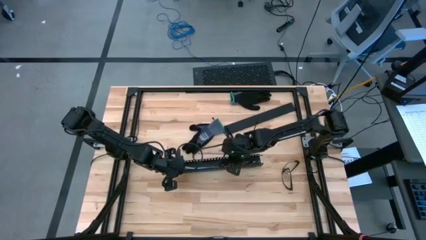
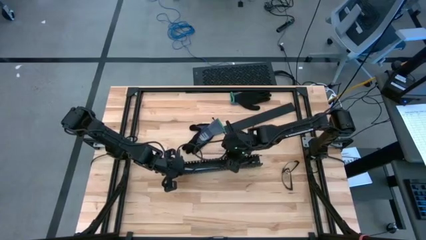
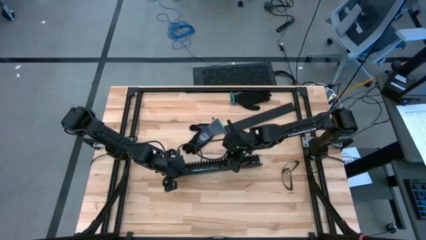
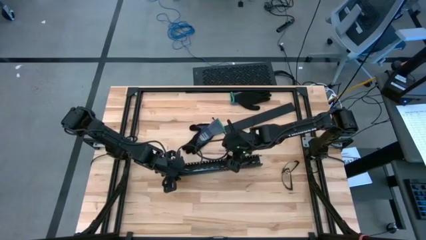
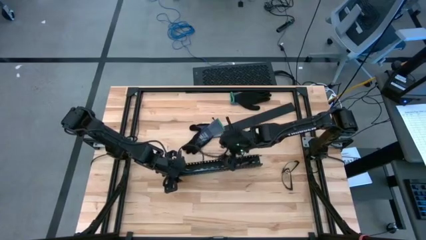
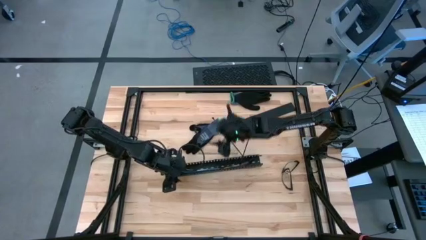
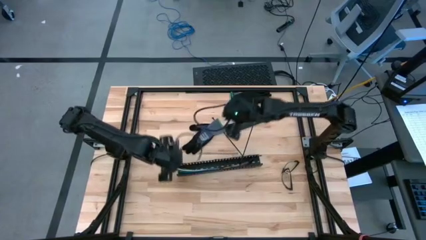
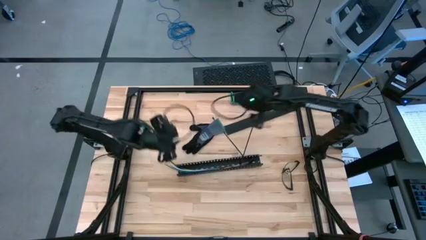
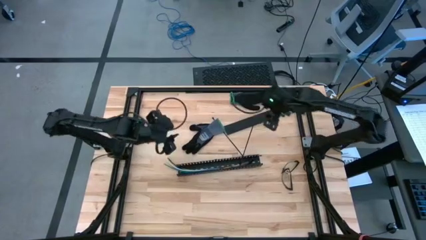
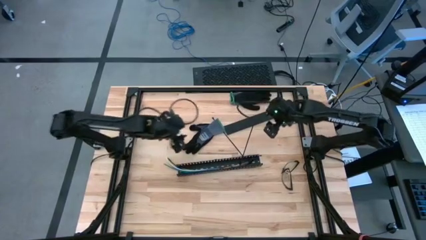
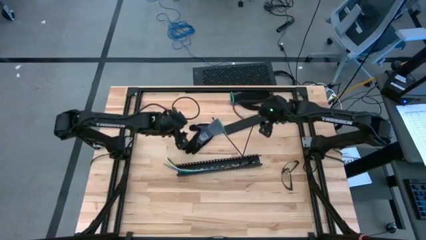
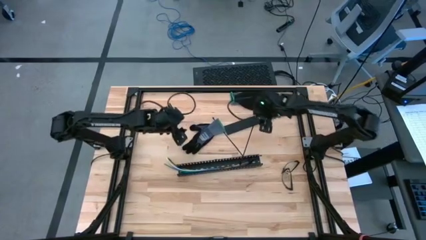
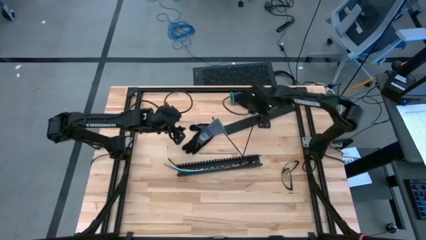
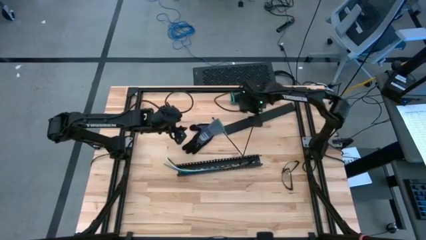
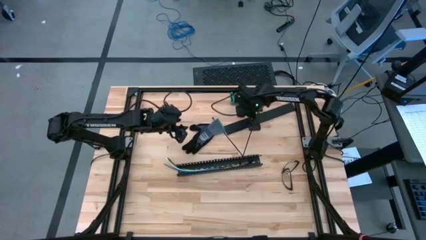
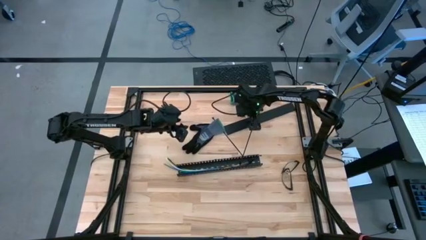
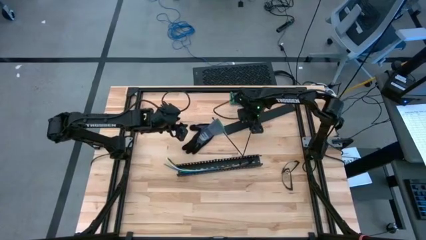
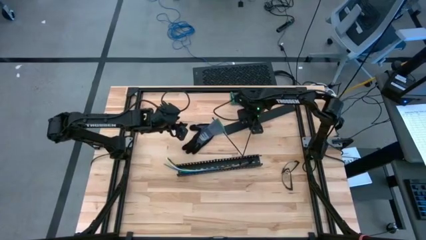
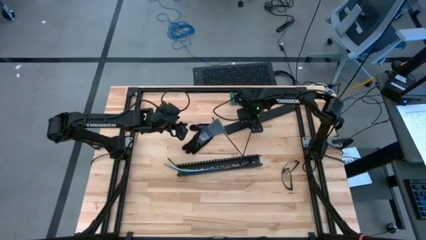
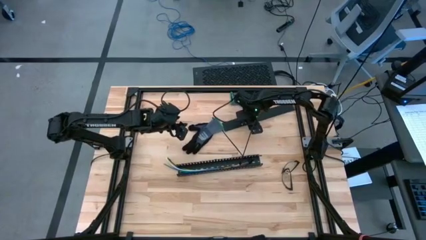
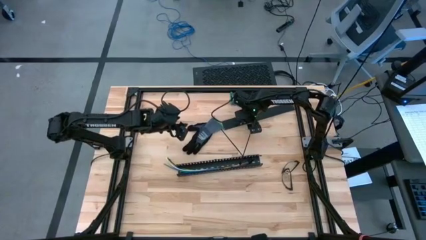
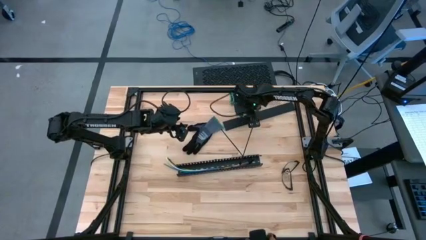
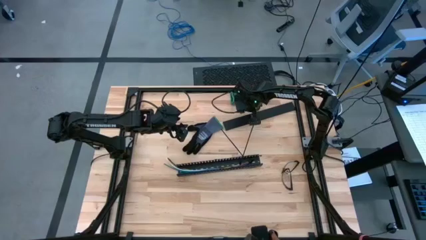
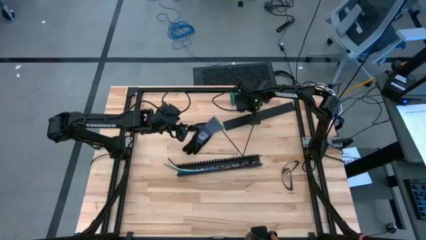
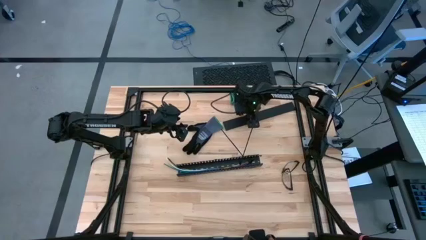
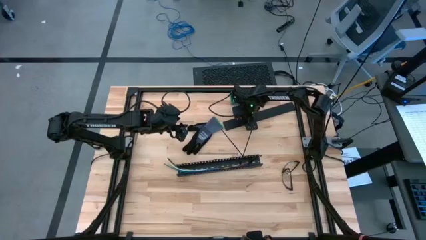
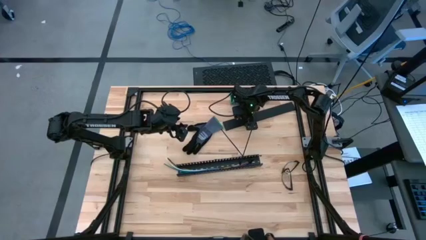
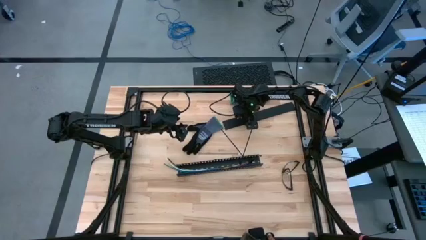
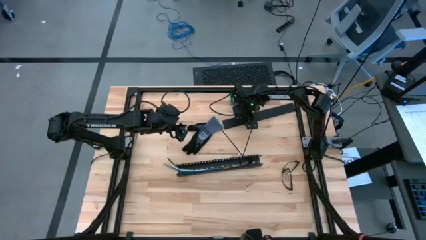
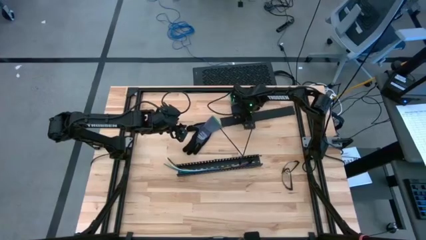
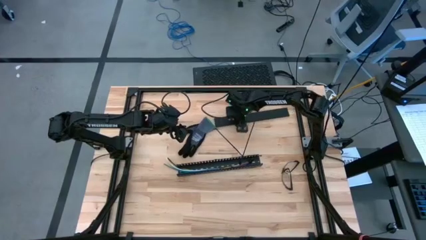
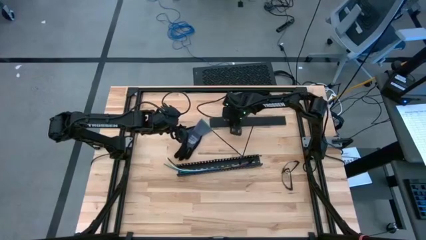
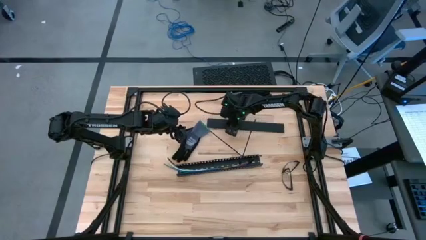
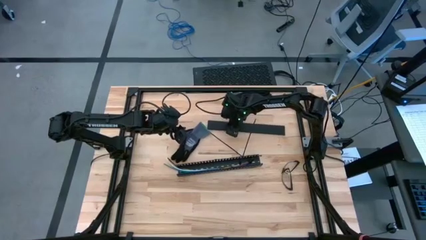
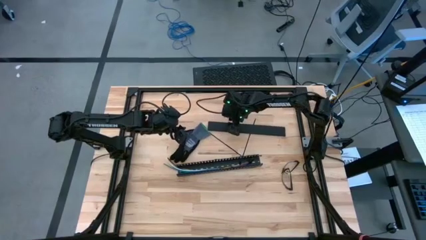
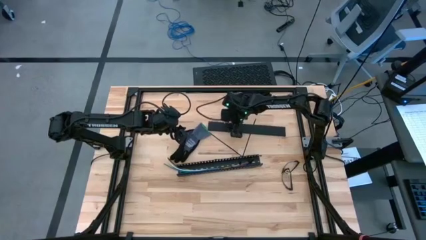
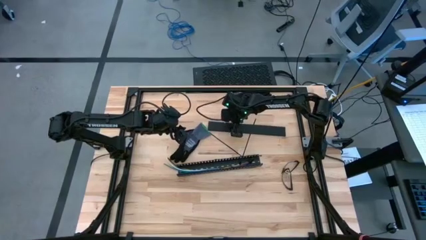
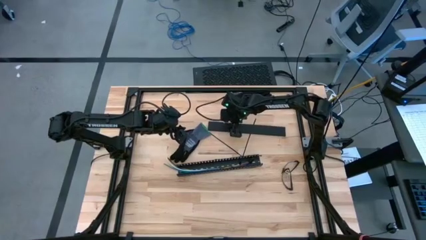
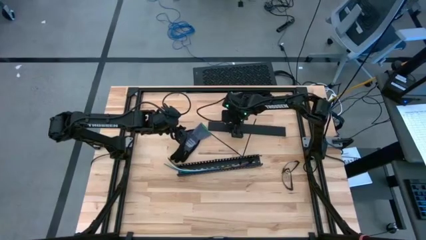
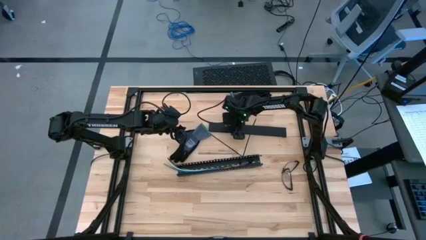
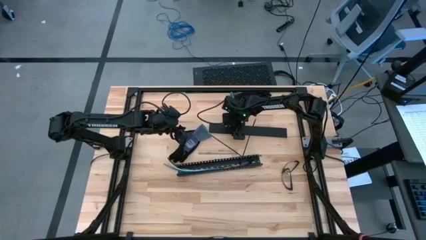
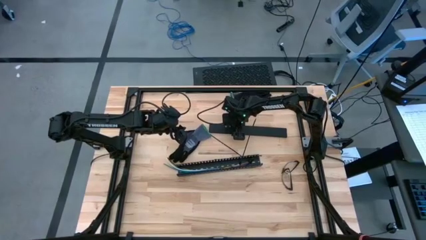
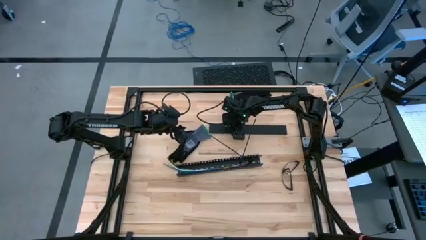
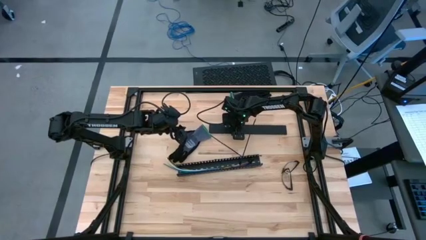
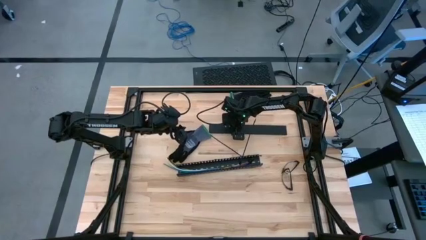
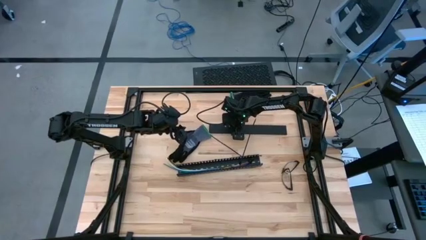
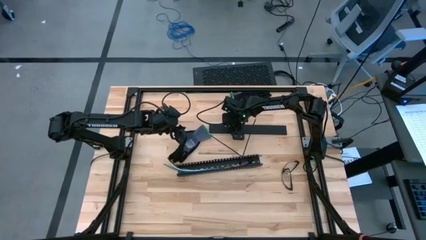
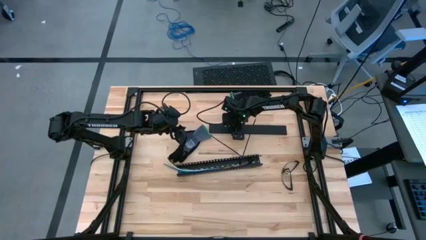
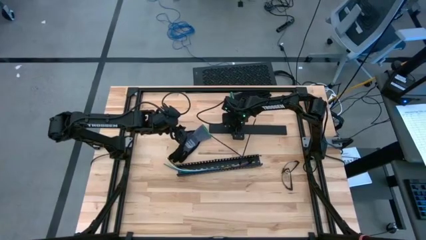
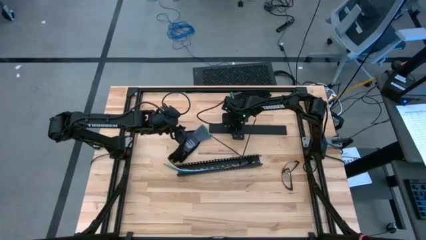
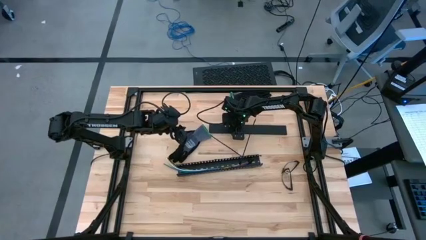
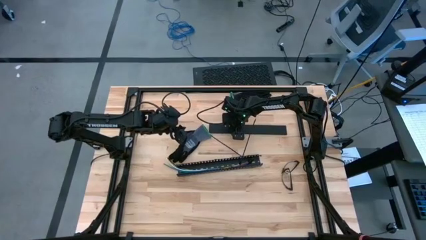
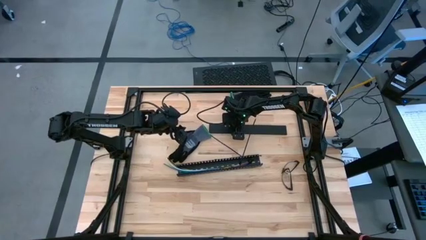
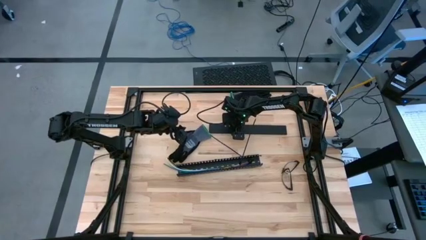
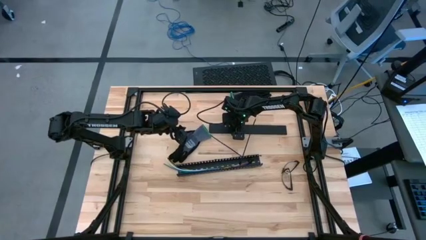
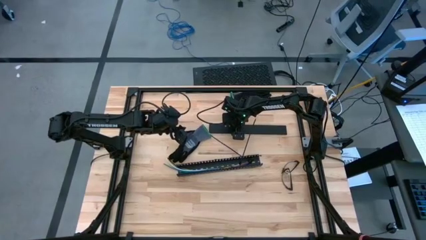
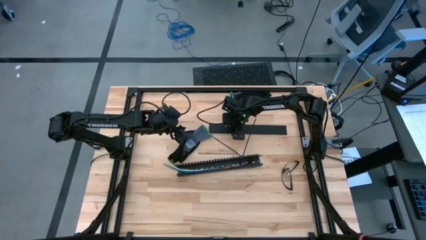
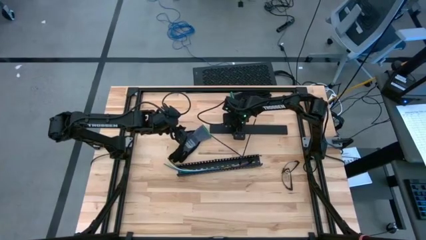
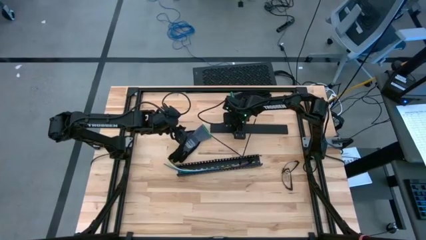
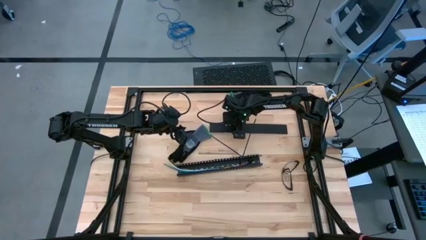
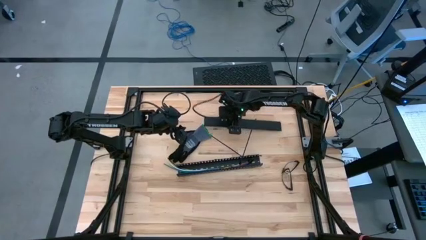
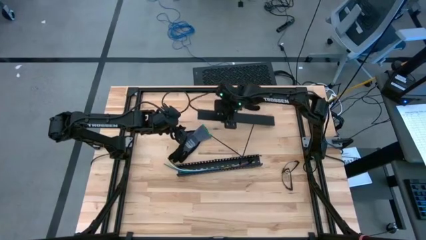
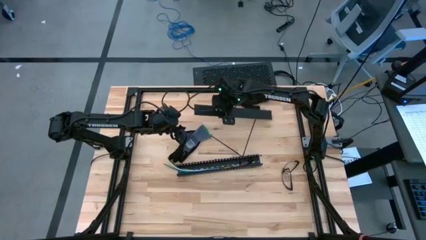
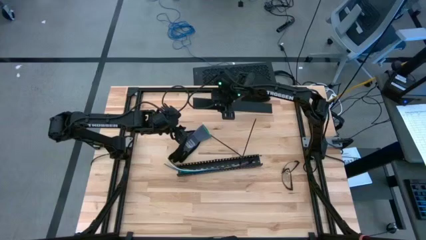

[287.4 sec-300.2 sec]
Task: Ziptie cables
Close the black cable duct
